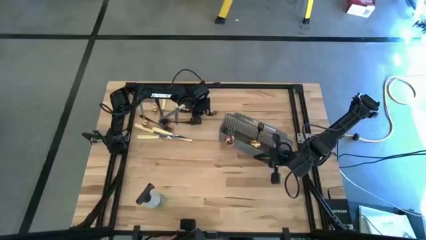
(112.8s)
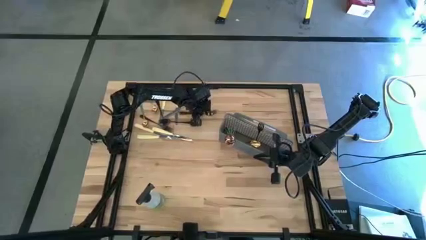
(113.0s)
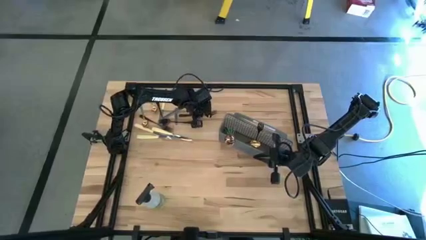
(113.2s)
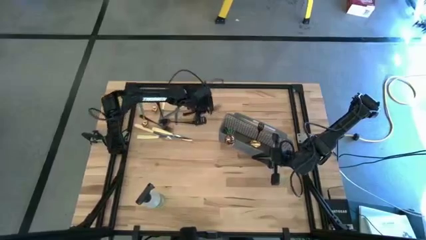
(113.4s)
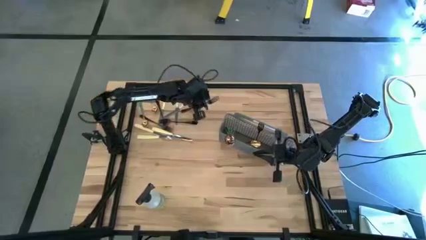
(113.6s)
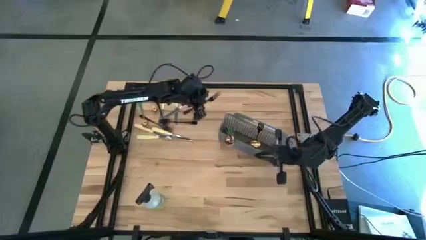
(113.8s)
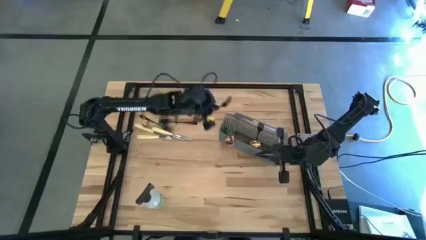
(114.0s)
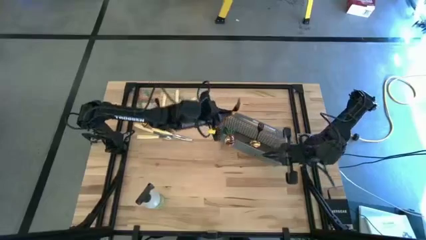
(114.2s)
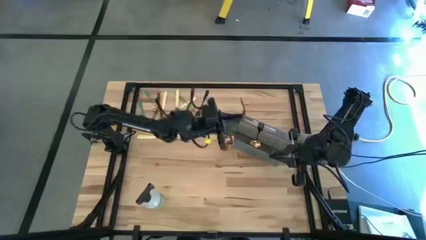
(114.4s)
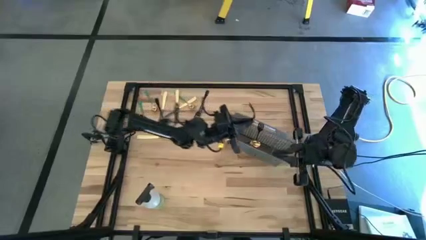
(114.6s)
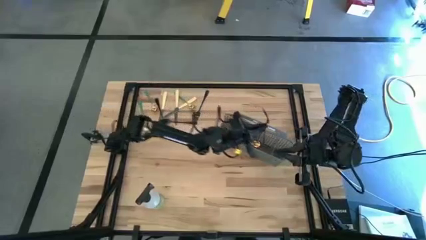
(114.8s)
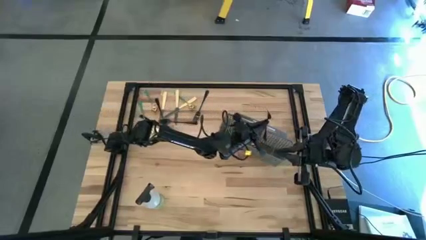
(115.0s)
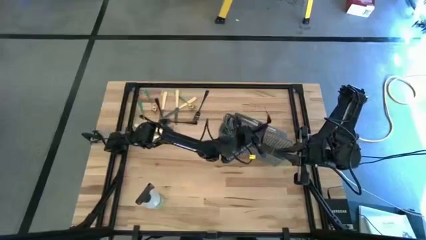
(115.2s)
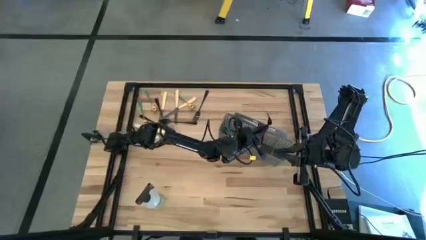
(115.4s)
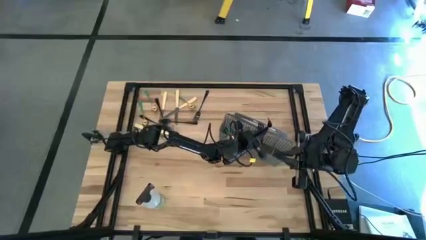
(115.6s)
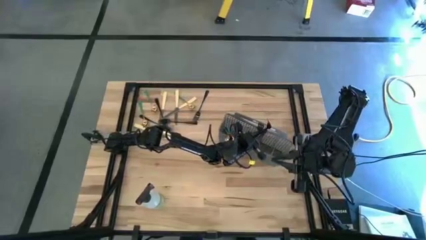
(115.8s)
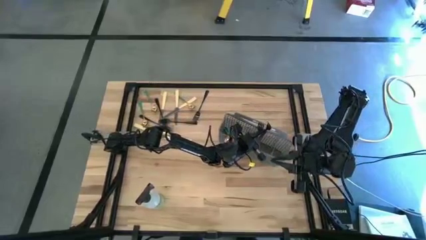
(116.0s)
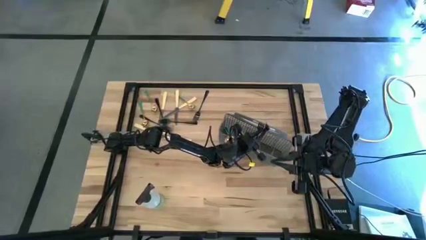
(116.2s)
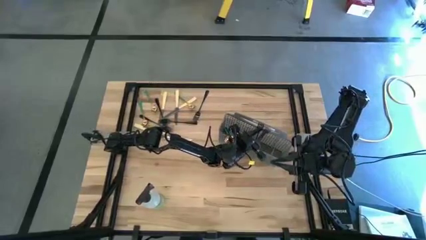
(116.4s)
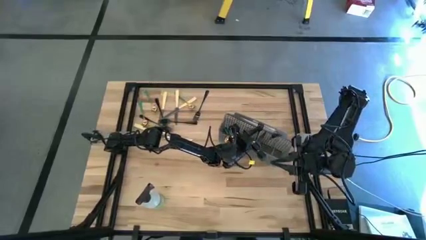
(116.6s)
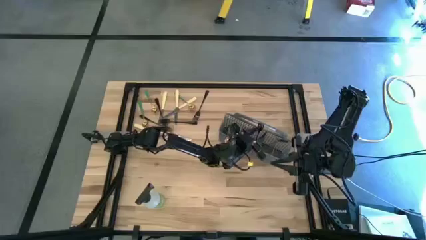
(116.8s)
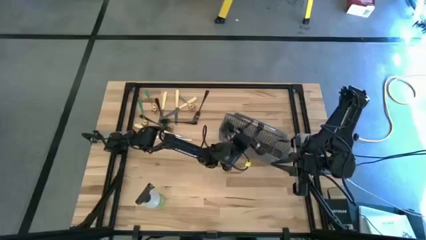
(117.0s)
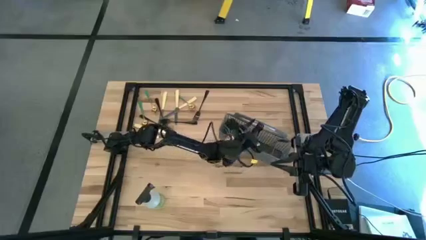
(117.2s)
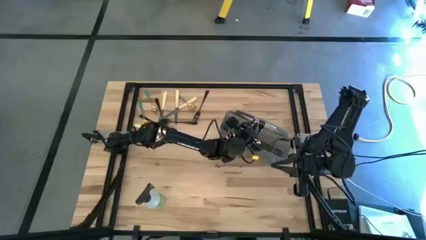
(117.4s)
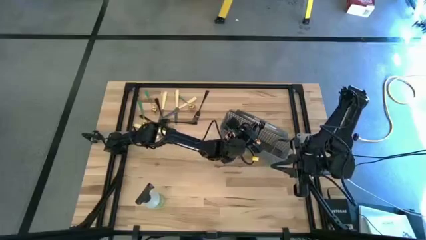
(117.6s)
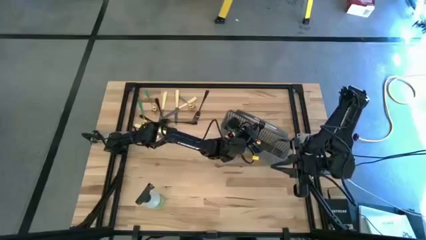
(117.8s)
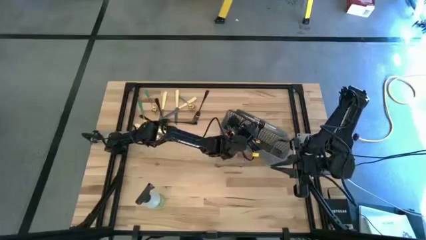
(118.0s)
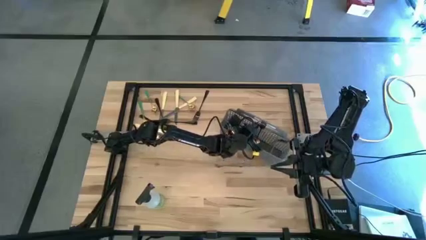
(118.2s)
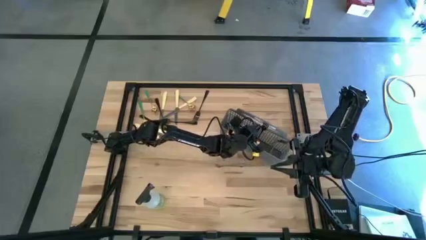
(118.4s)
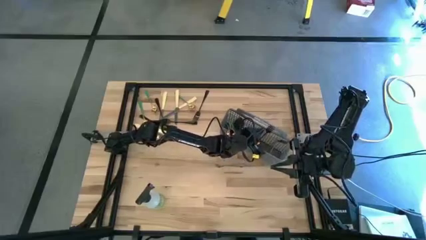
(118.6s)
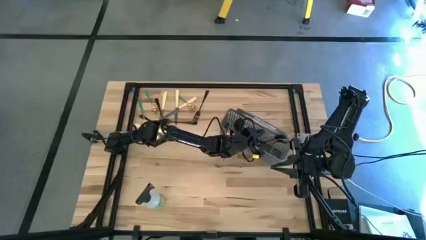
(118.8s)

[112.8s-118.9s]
Task: Sort silverware
Put the black fork into the cutlery rack

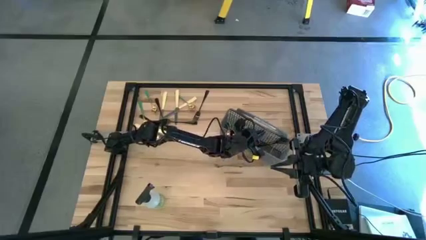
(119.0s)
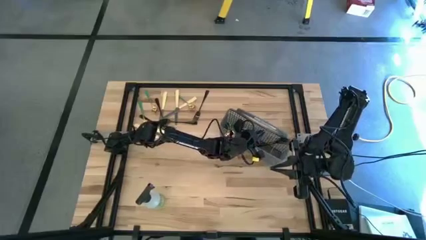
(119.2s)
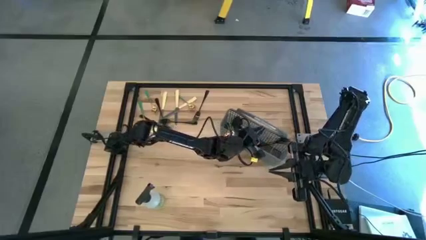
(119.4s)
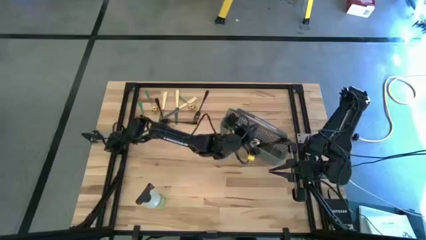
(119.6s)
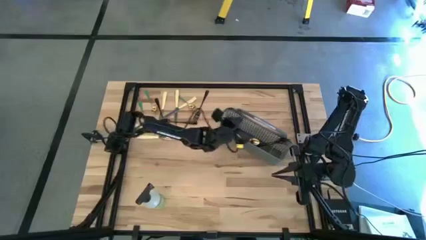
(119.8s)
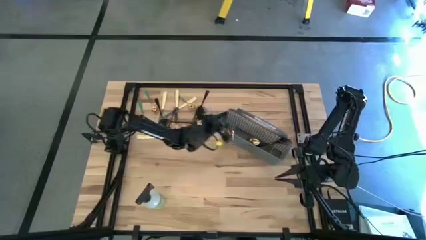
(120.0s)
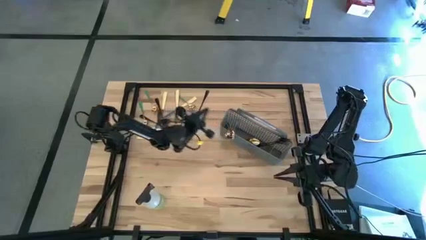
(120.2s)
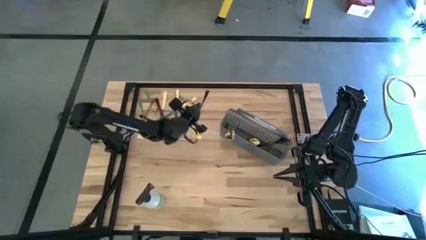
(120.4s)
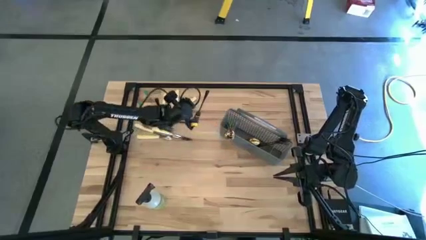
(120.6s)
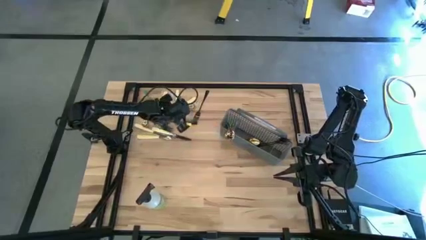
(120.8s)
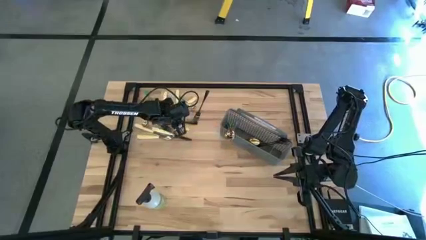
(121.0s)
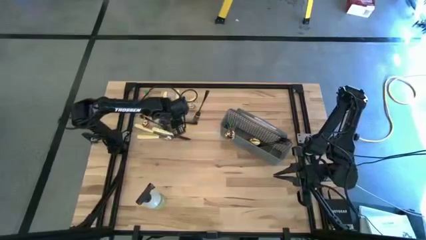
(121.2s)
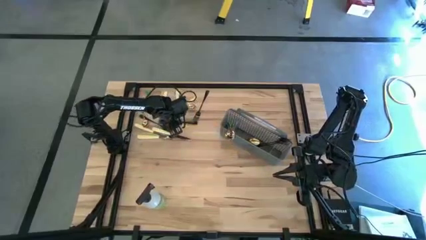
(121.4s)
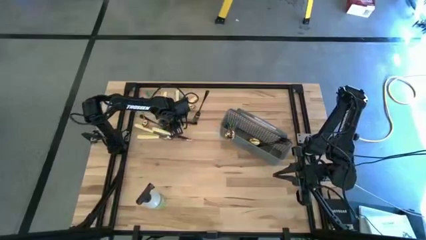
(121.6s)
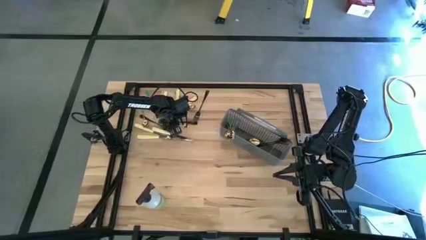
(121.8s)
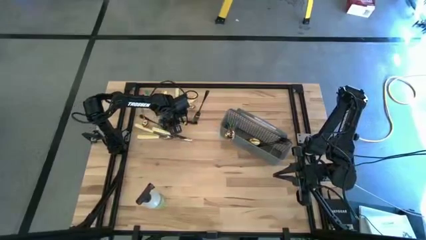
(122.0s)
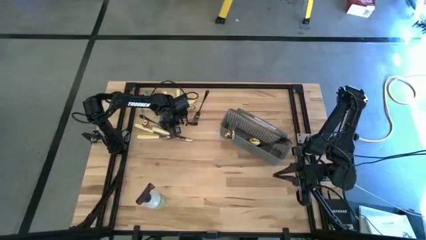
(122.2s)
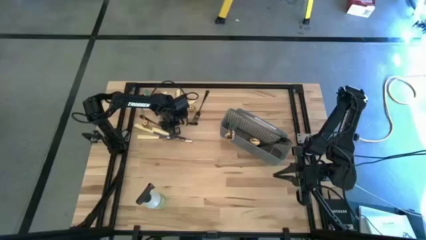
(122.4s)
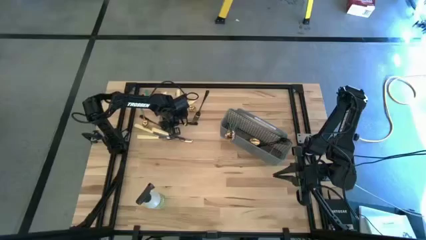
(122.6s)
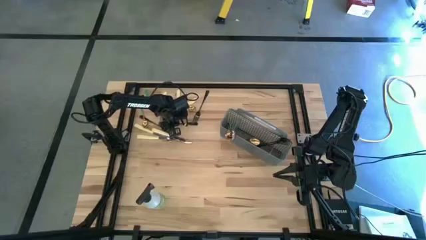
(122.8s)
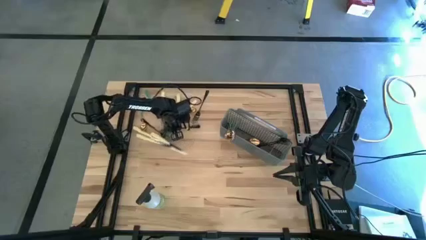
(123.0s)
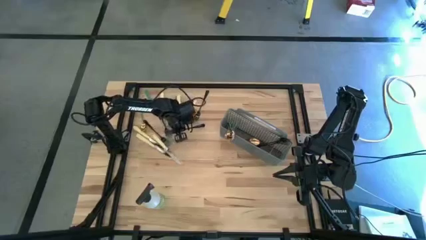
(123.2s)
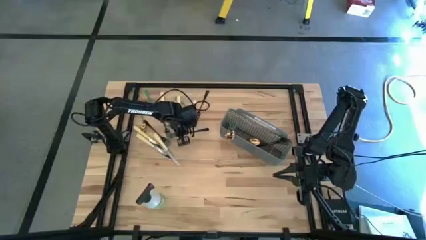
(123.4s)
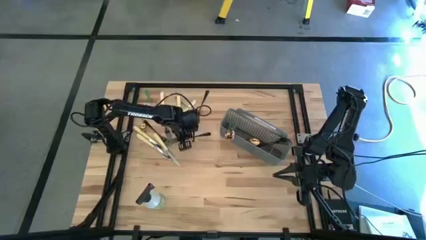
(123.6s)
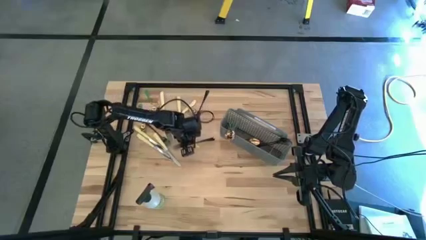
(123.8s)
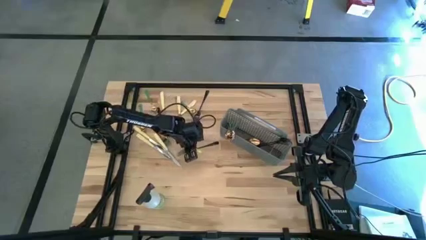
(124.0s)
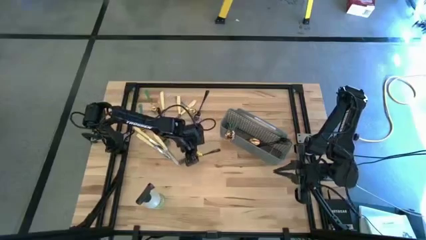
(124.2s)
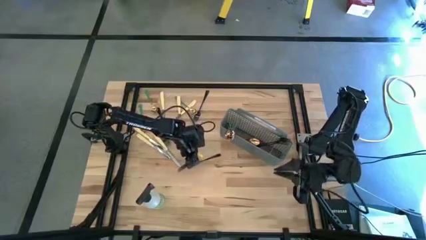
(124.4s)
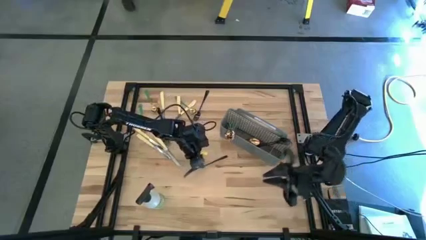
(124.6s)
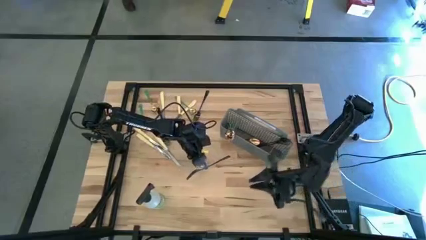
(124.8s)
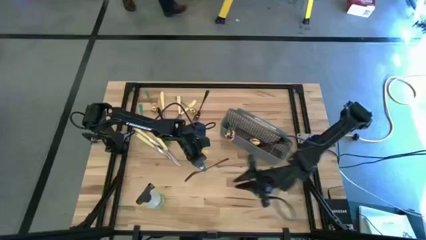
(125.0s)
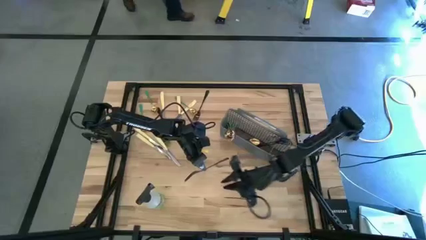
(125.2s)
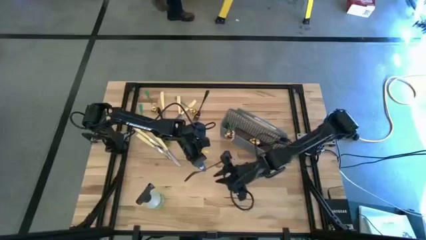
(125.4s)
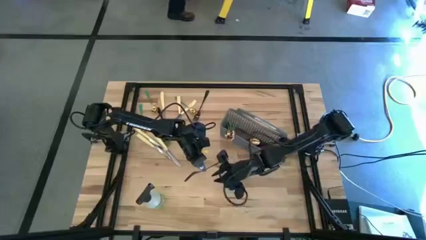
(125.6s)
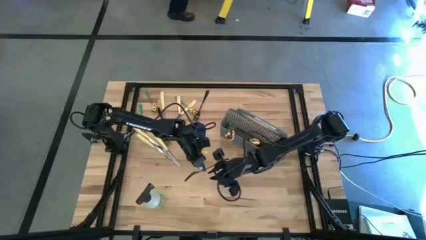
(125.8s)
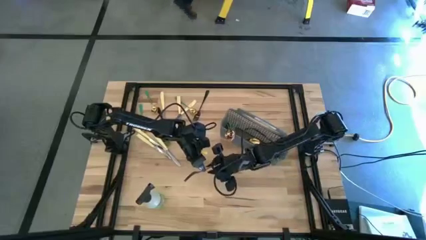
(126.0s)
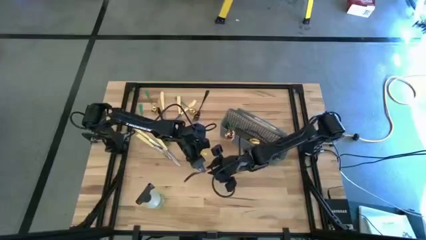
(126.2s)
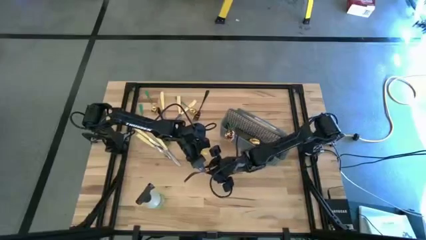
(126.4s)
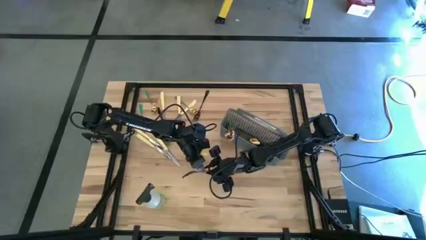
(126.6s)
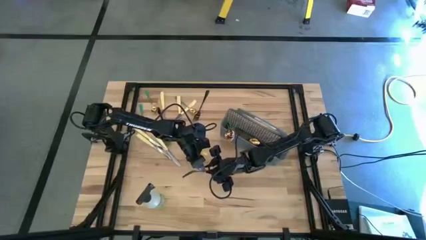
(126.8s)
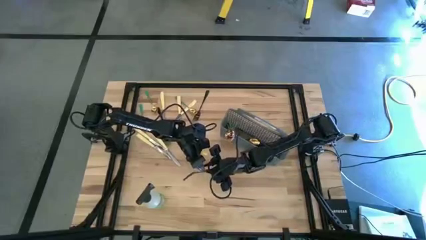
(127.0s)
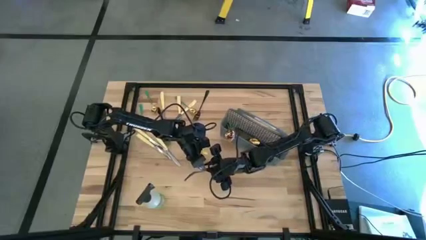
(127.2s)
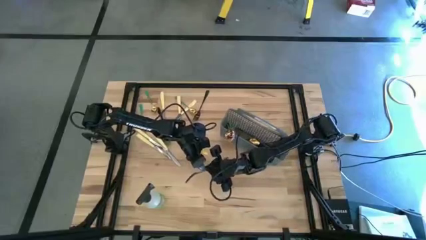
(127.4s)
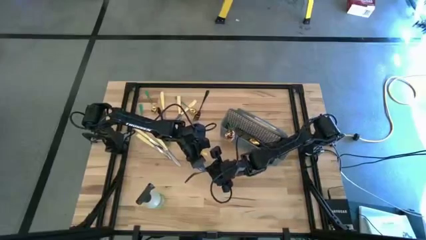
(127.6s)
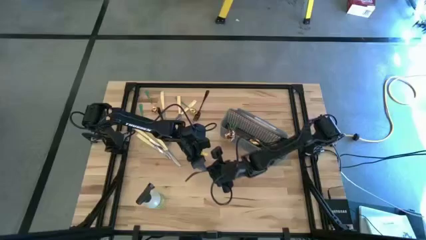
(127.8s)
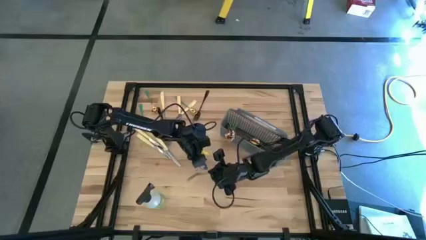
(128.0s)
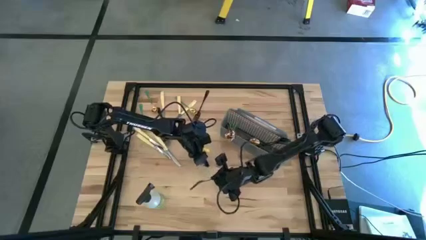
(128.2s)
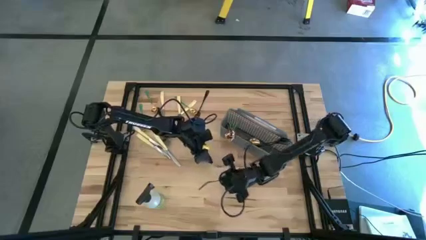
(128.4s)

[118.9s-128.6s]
Put the black fork into the cutlery rack

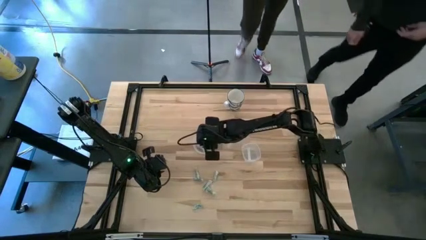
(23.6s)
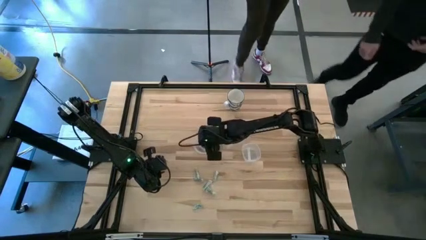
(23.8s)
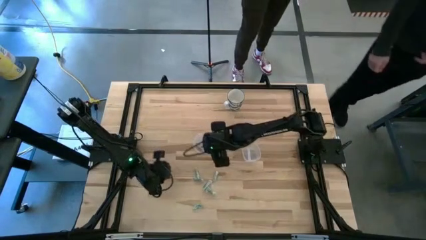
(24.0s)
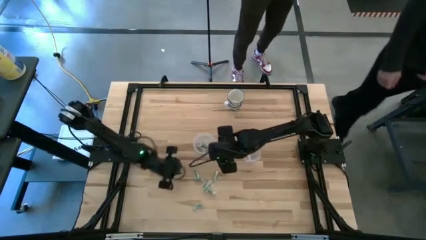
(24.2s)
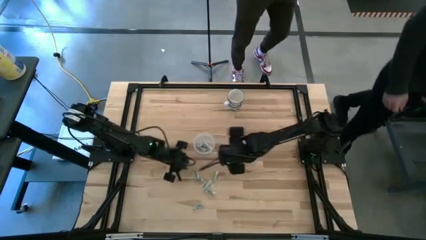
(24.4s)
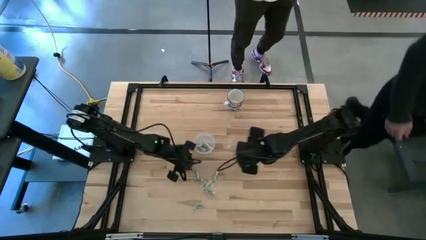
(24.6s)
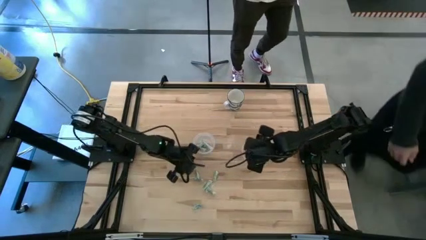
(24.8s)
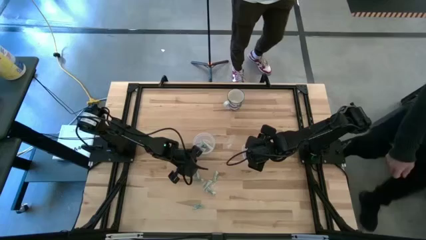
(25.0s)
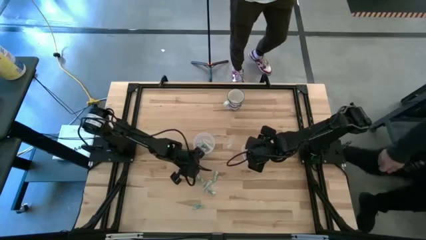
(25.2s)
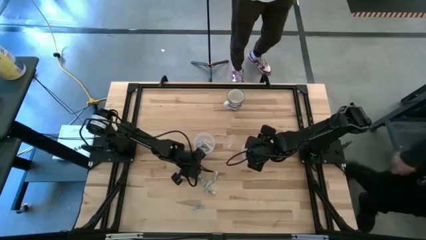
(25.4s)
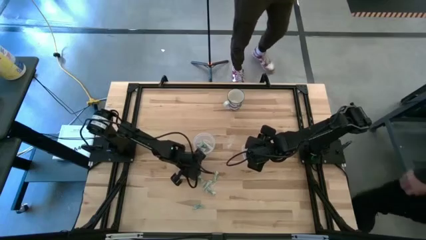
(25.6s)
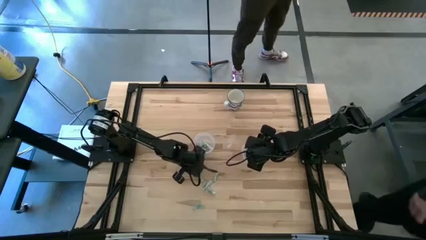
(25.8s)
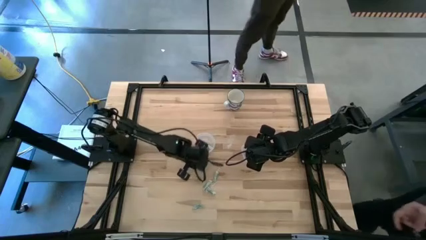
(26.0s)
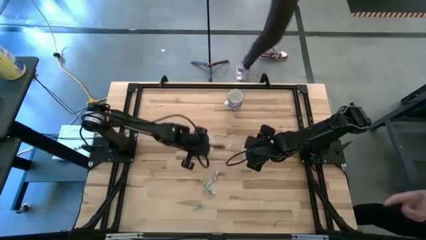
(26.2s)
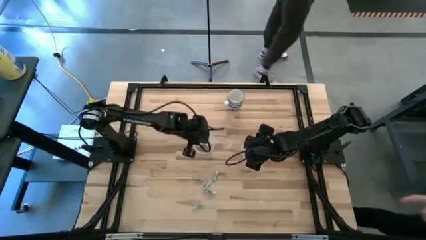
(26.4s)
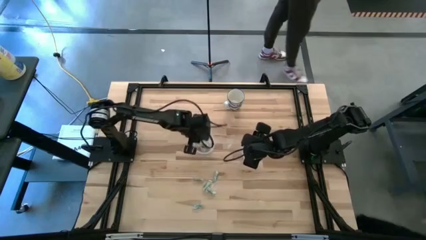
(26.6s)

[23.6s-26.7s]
Task: Pick and place Stevia / Truvia into bins
Put the green stevia packet into the left transparent container
